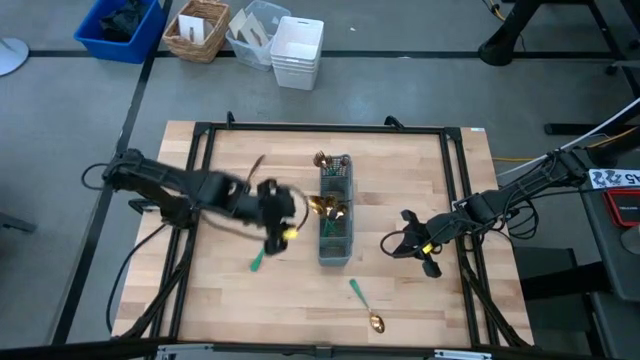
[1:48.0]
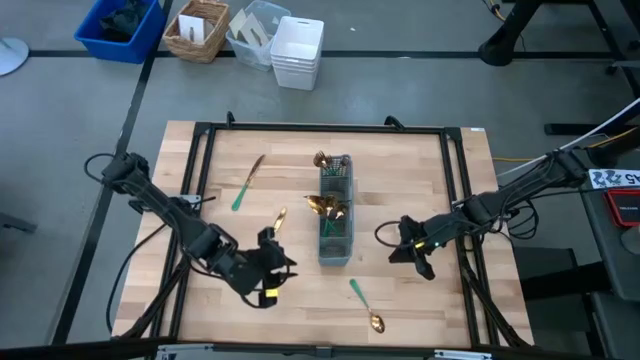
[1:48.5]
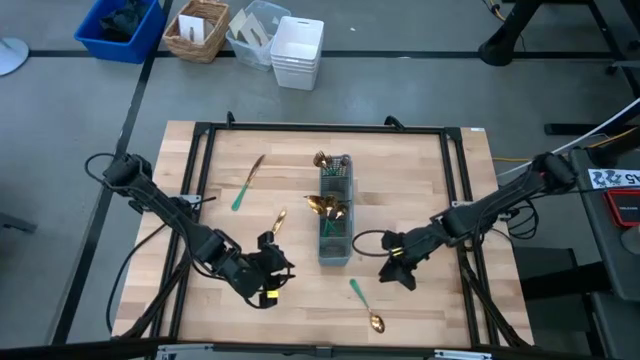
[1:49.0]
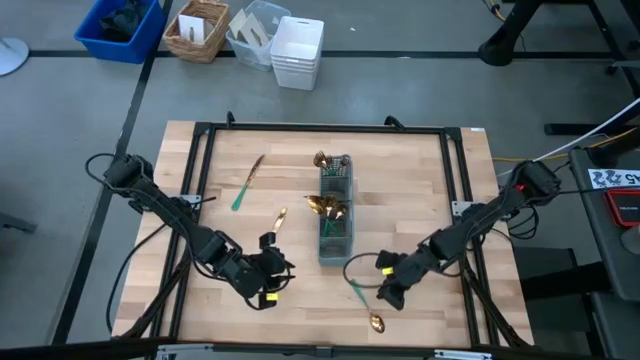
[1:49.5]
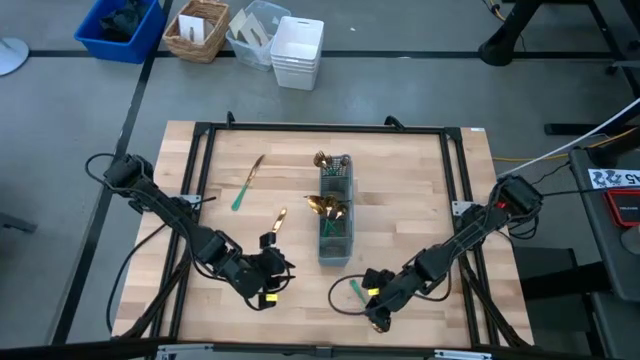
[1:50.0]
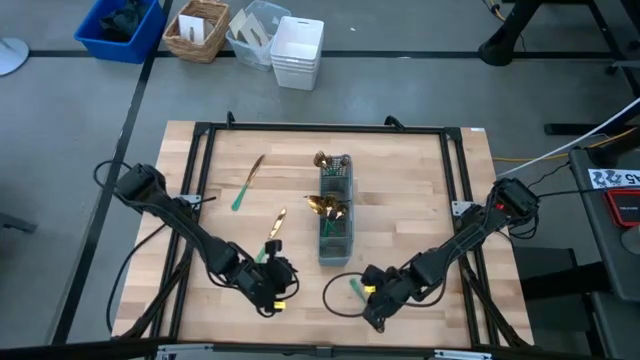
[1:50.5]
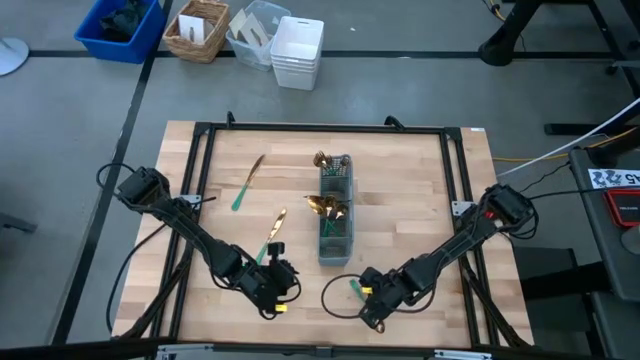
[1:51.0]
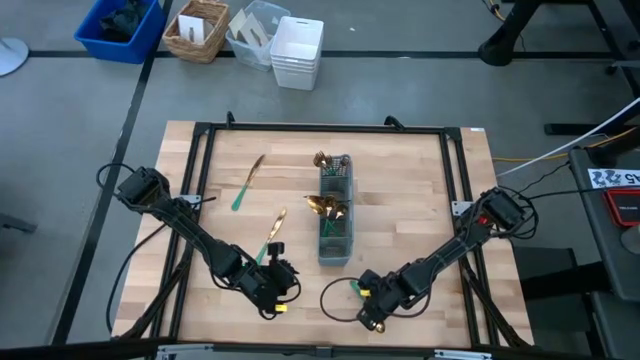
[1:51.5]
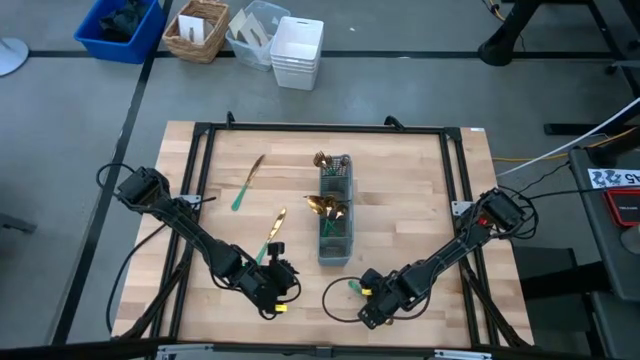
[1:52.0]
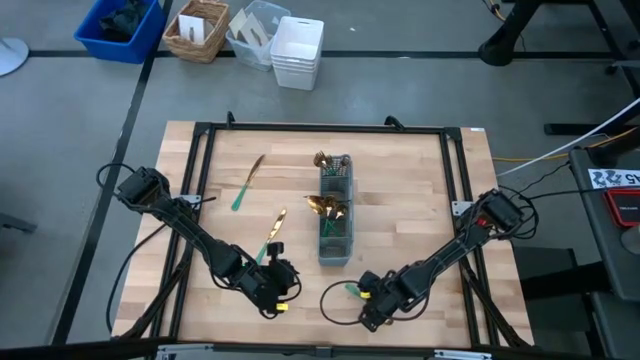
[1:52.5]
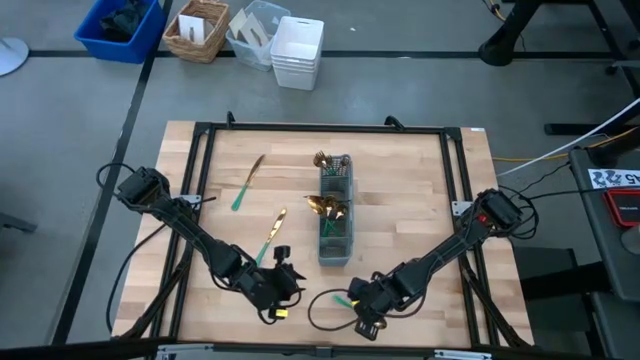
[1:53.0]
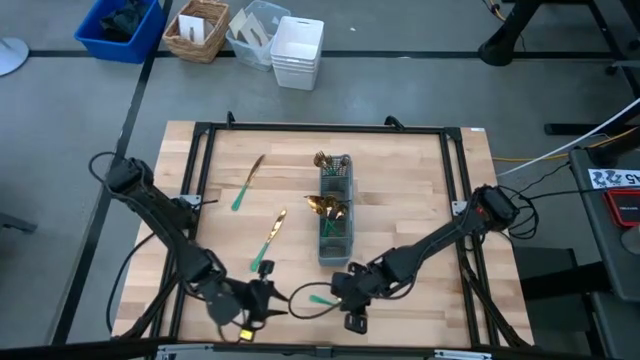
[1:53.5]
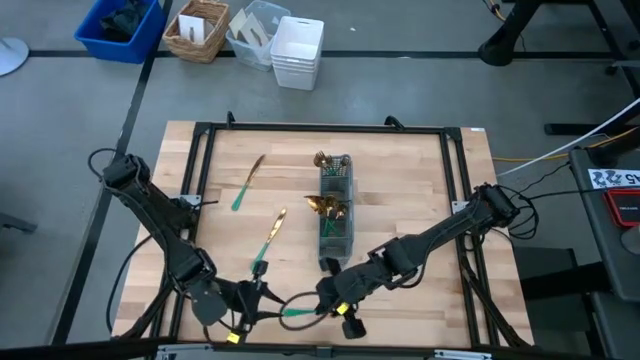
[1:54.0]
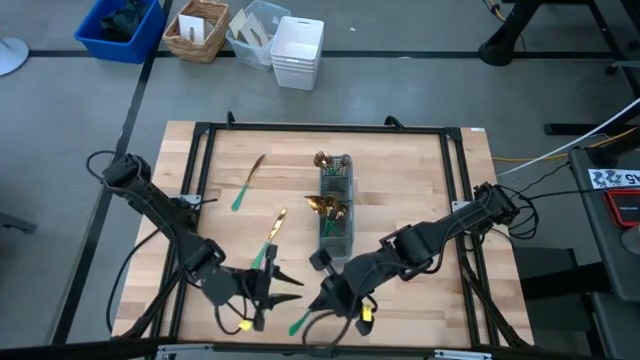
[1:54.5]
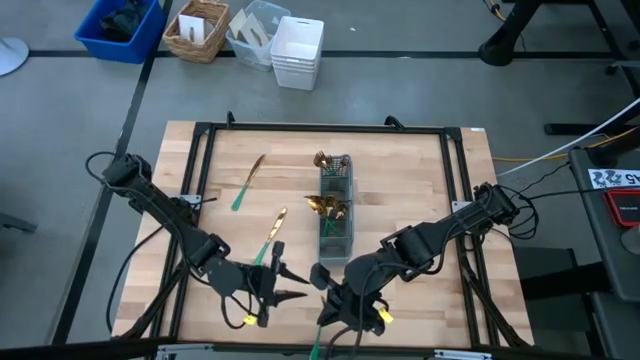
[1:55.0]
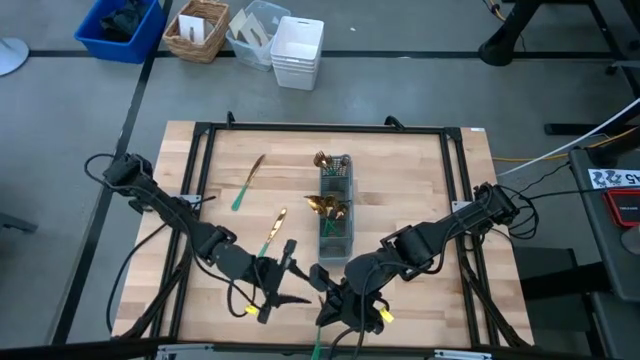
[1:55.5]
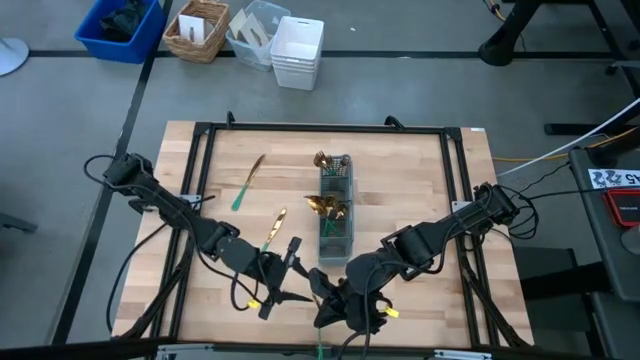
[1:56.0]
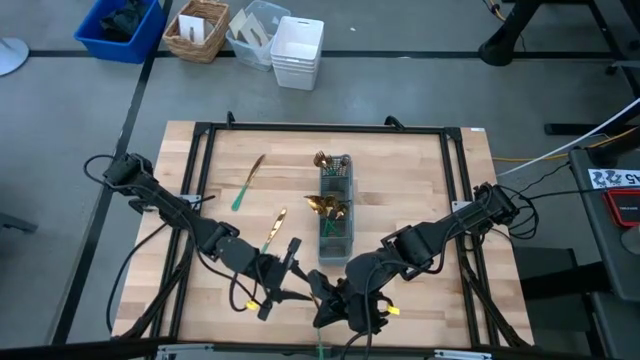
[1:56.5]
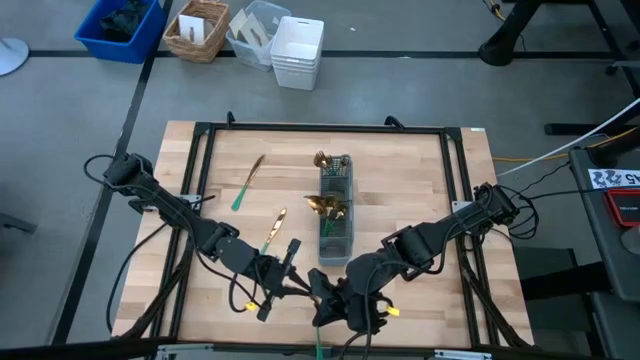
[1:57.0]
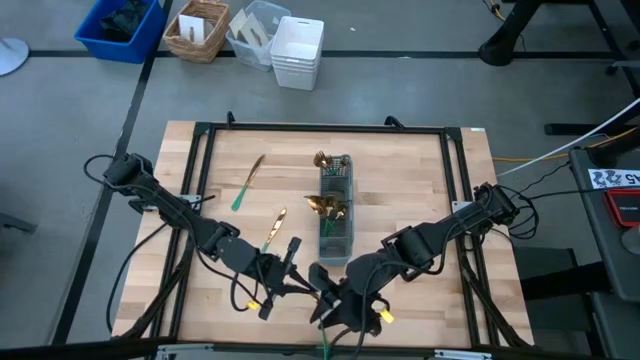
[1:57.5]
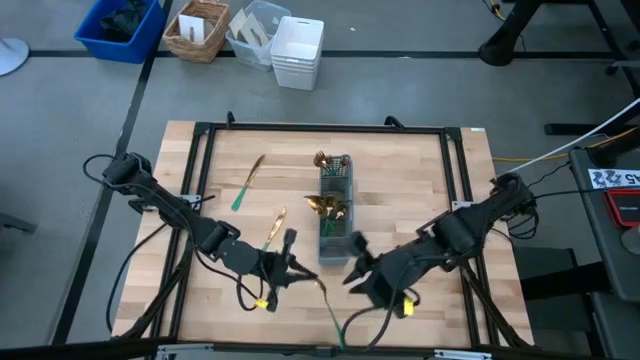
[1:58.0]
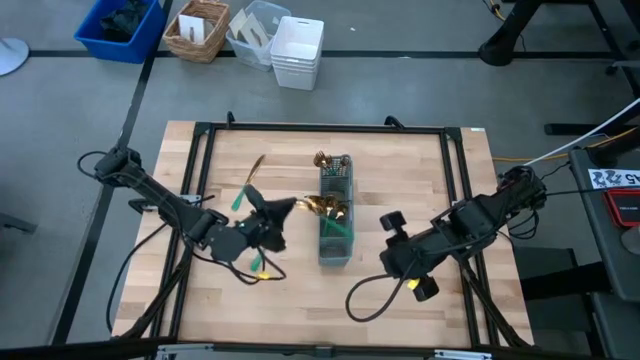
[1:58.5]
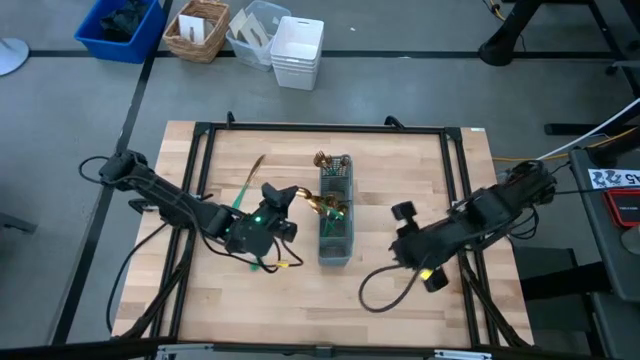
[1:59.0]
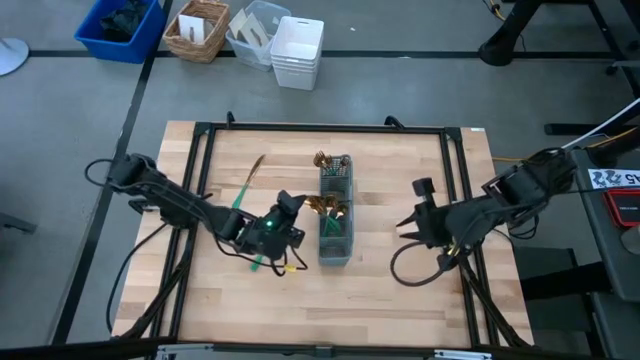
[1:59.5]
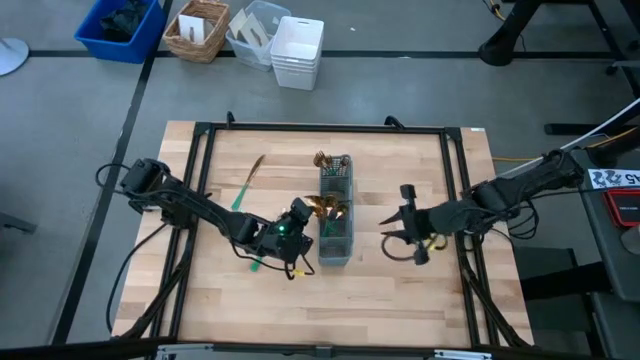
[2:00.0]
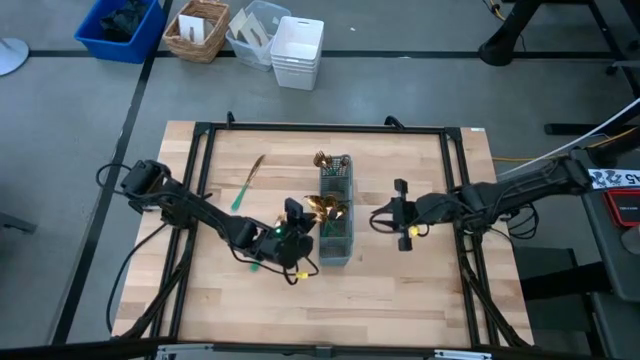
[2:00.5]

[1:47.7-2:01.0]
Task: Sort silverware
Put the green spoon into the utensil rack

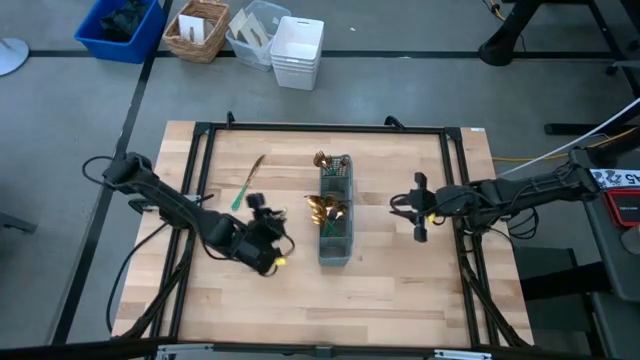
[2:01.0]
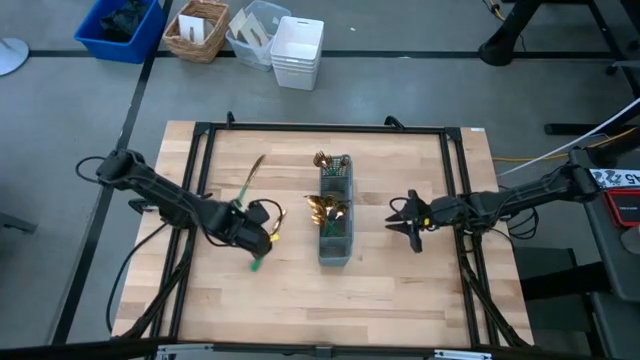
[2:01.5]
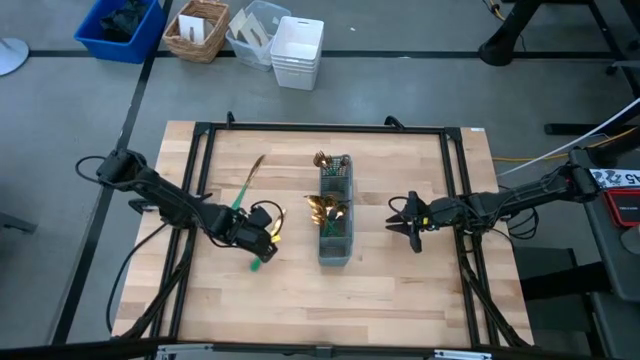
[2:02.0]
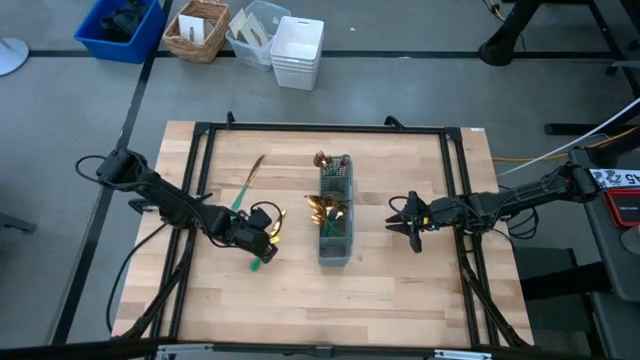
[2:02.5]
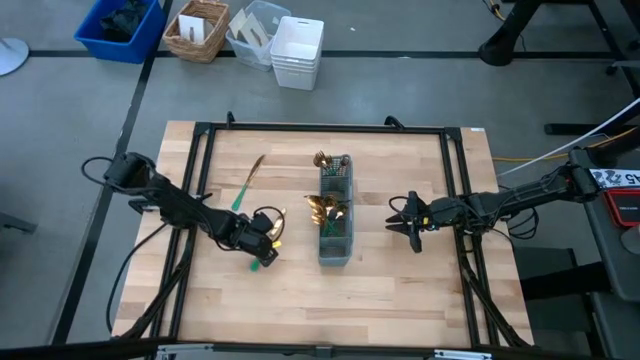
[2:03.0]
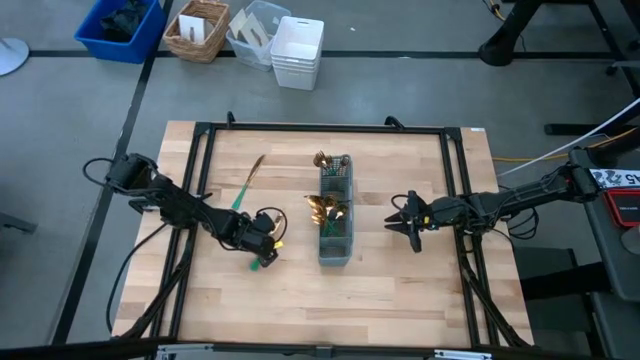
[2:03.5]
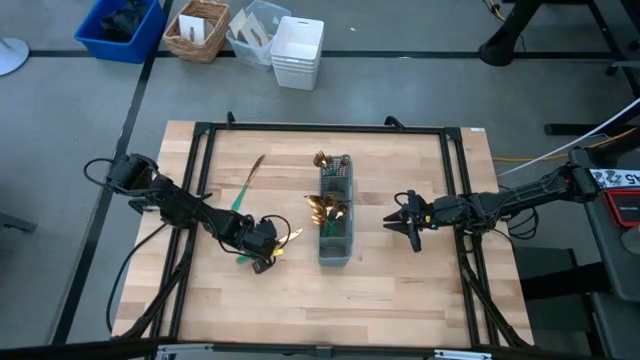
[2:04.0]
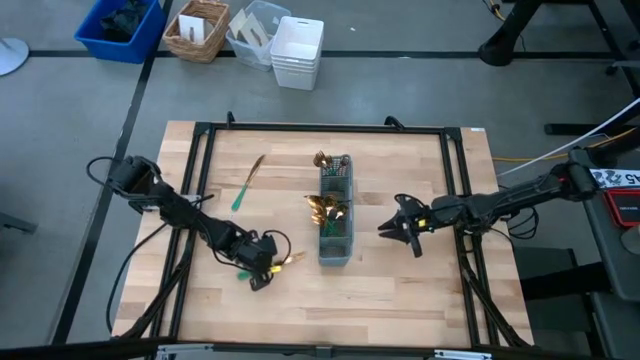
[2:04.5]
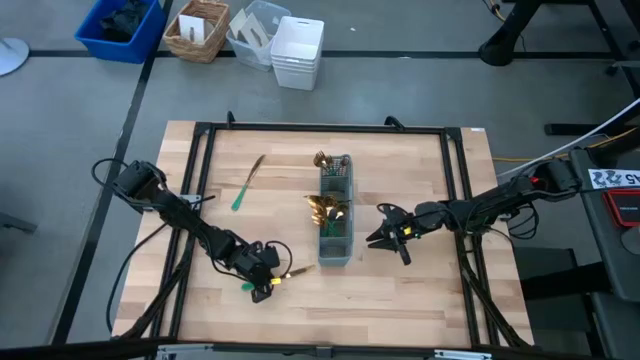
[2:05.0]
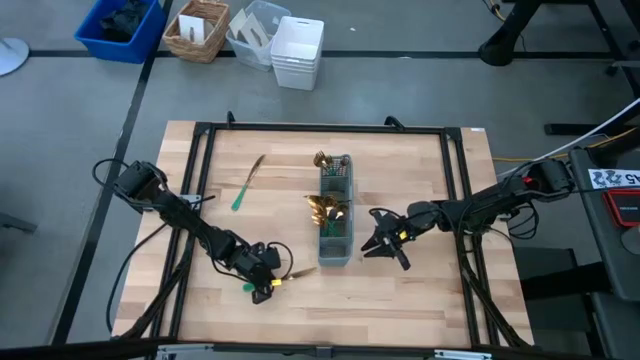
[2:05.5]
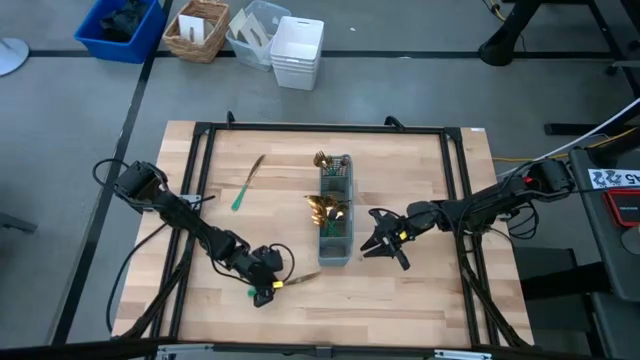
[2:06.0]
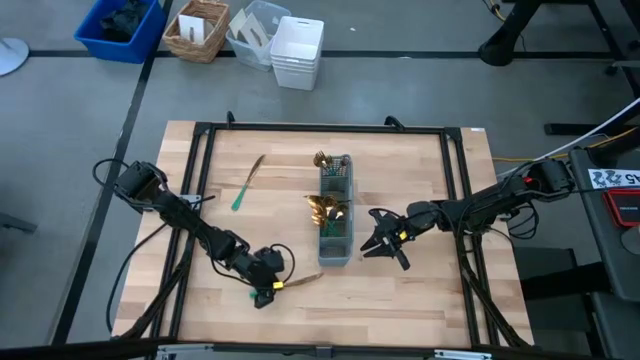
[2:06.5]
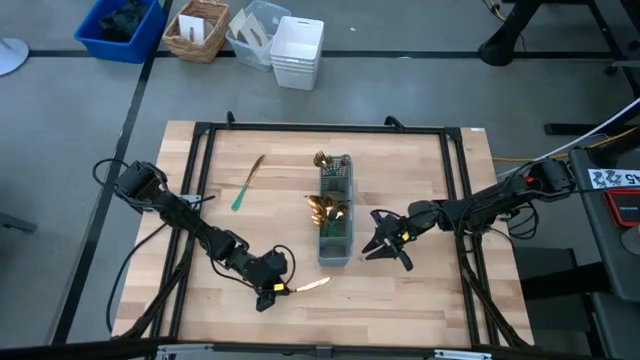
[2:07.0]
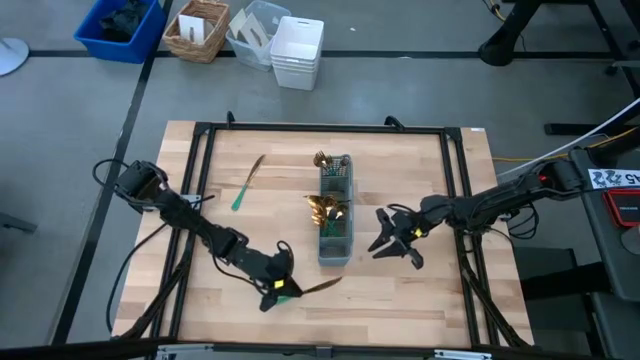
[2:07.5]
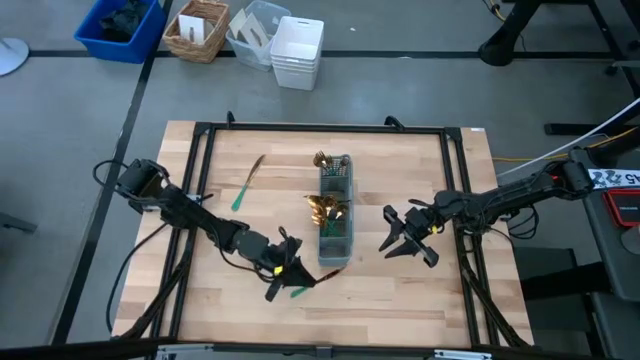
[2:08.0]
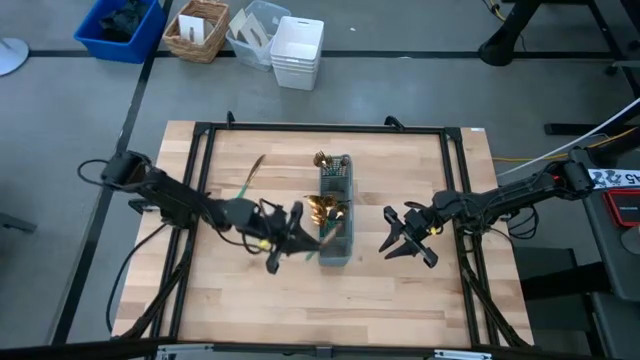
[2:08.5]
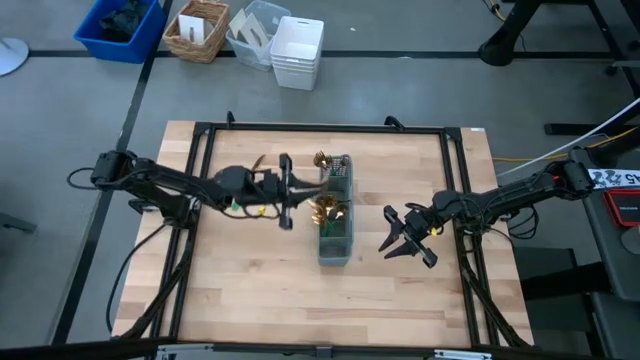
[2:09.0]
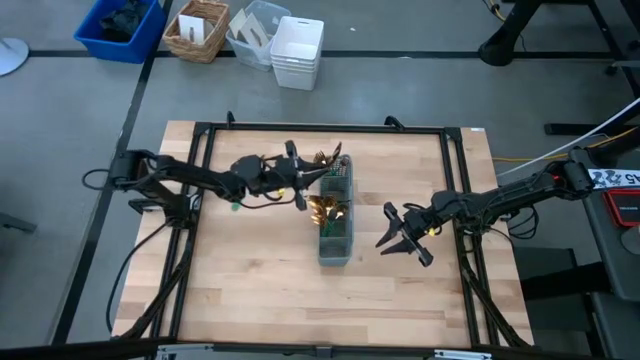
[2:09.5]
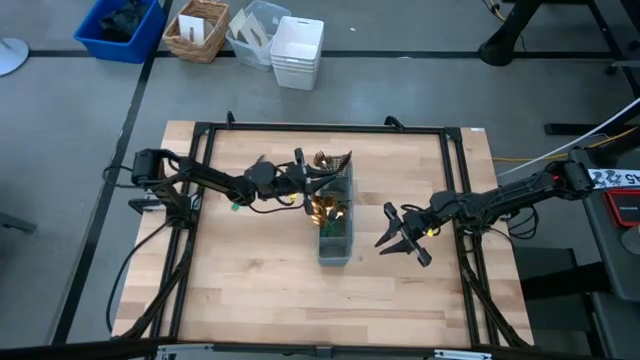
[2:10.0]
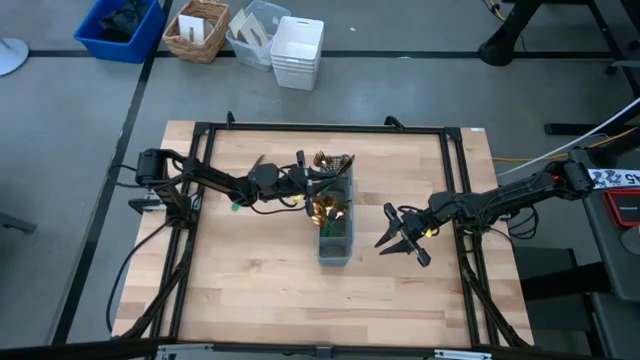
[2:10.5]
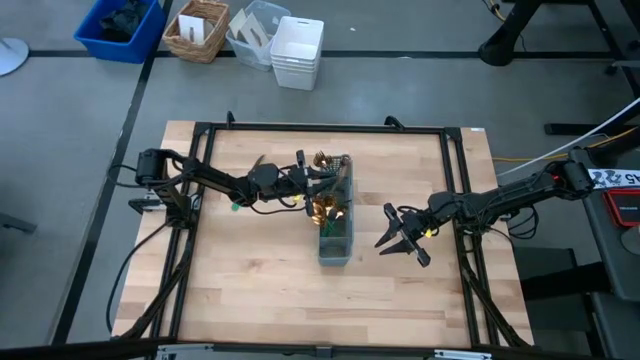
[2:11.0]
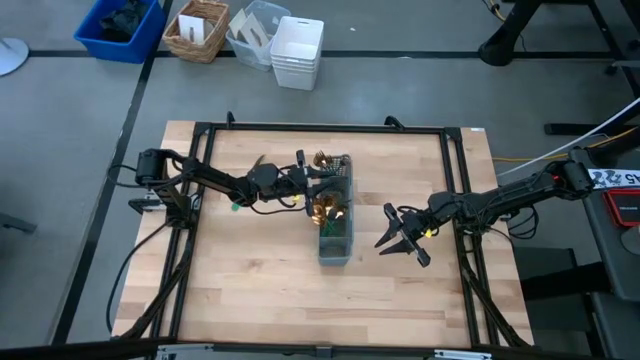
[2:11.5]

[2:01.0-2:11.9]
Put the green knife into the utensil rack
